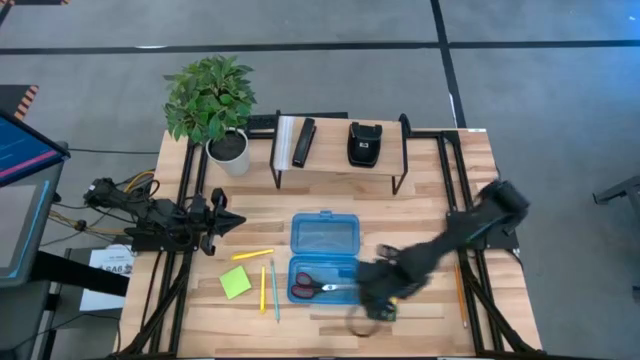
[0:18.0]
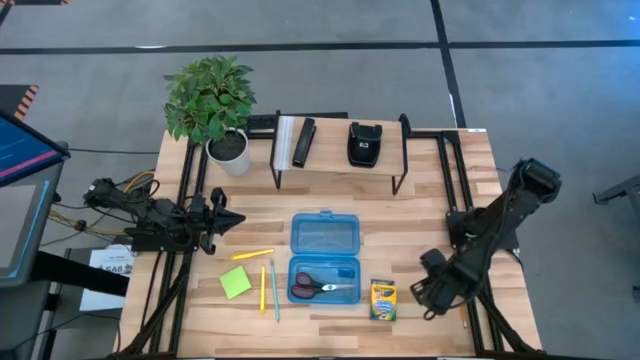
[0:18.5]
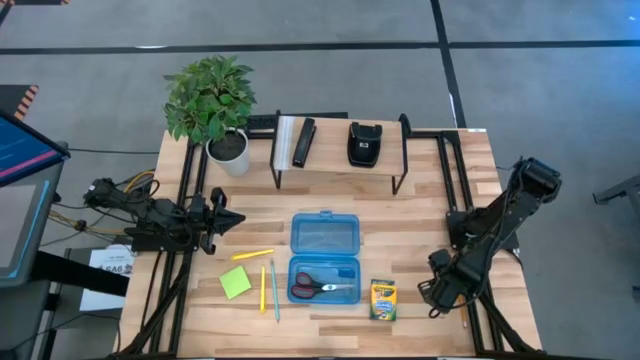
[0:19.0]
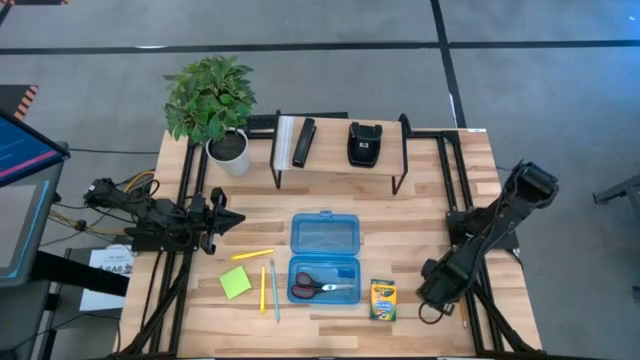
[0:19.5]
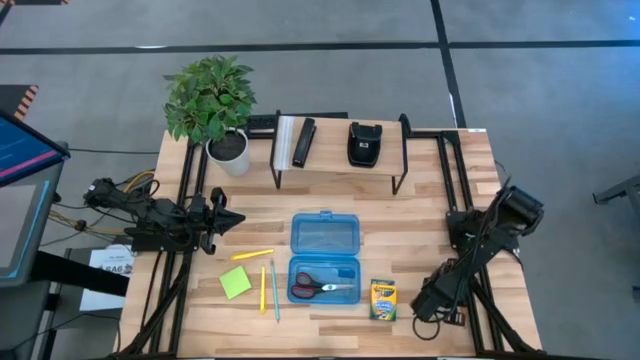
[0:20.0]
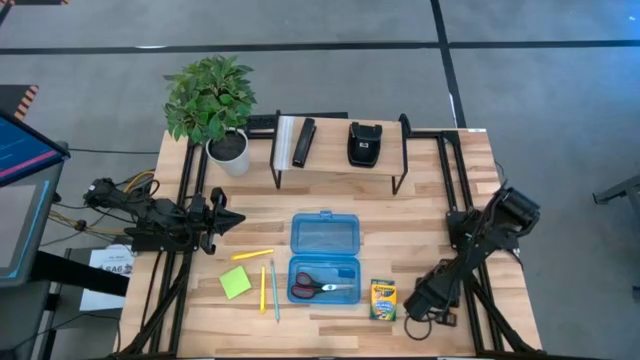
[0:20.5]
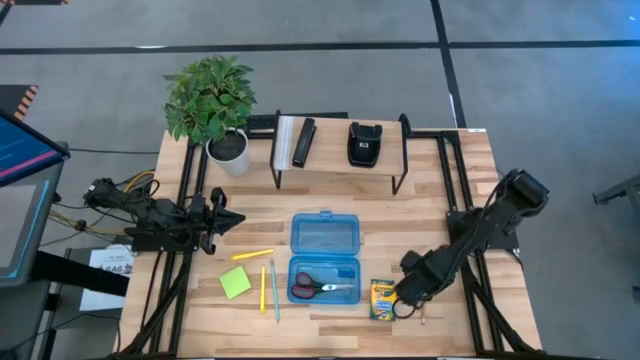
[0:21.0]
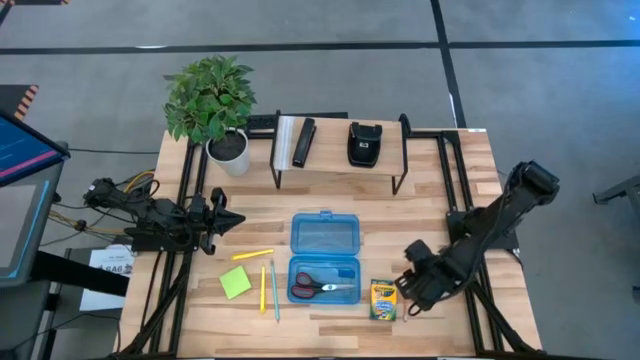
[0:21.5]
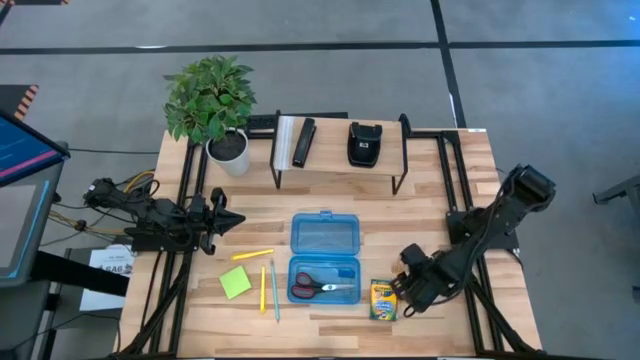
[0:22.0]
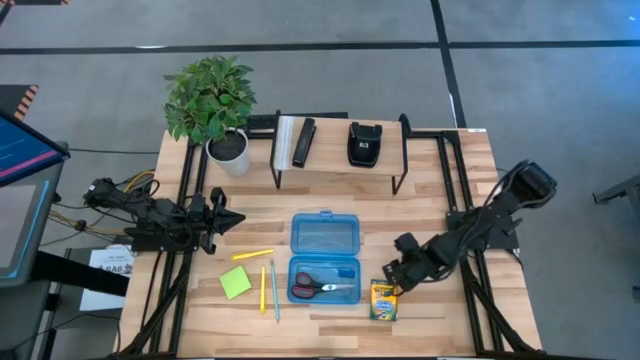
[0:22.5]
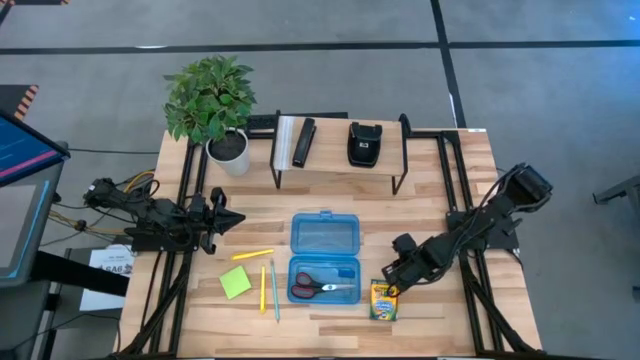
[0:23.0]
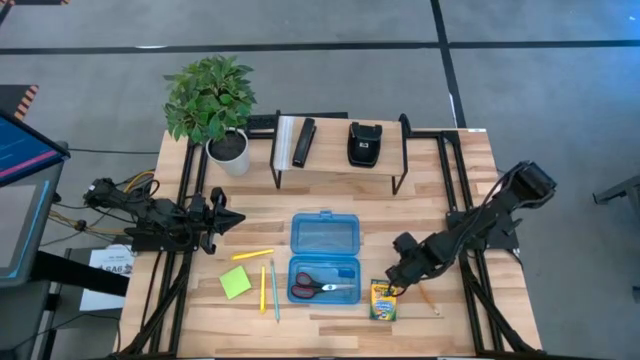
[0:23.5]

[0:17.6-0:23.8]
Task: Pack school essentials
Put the orange pencil into the supply box

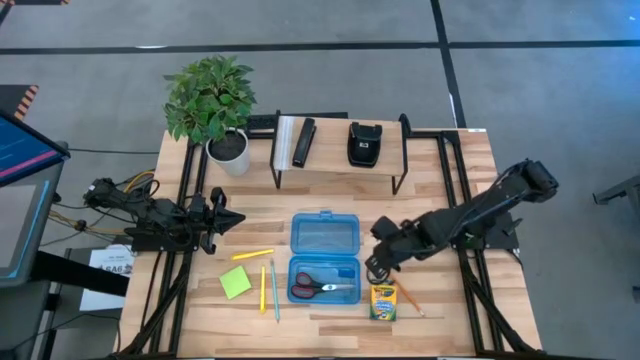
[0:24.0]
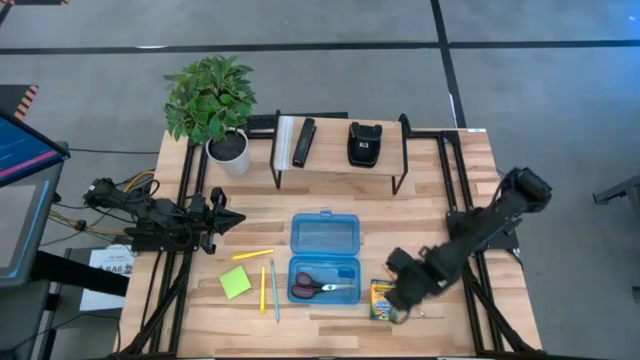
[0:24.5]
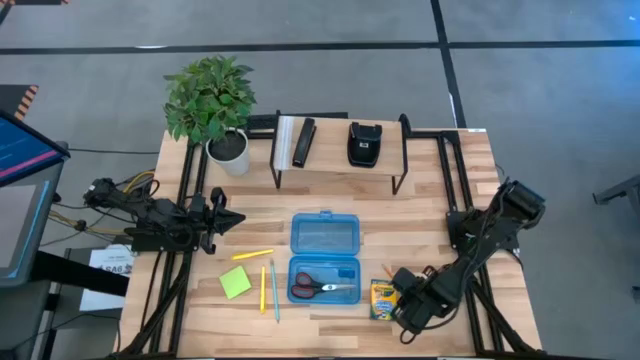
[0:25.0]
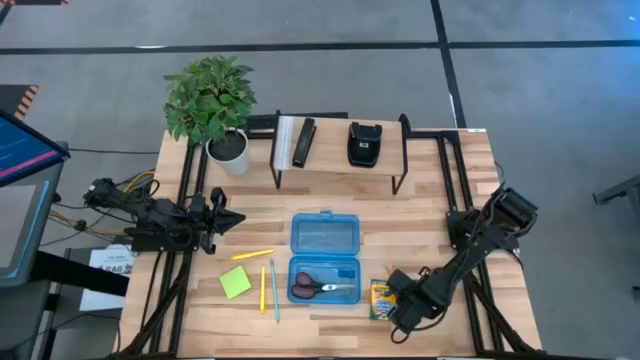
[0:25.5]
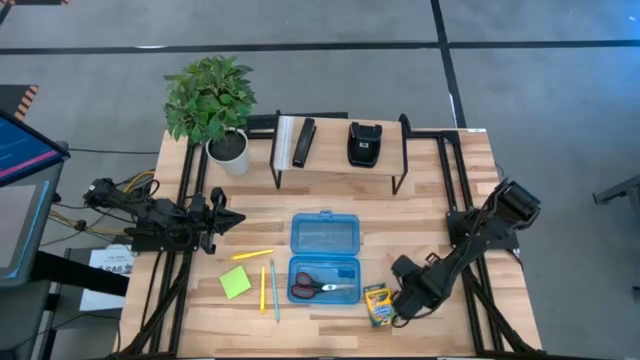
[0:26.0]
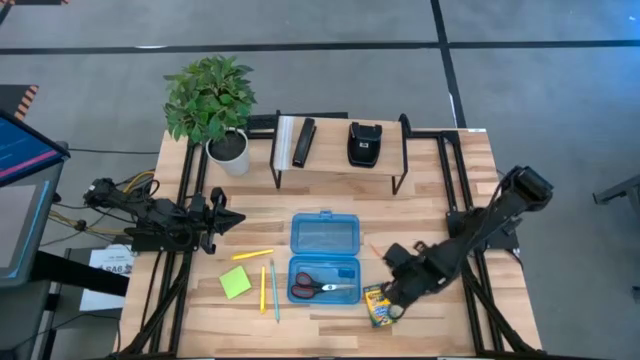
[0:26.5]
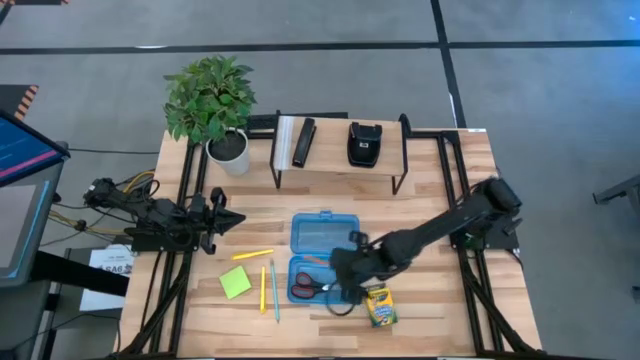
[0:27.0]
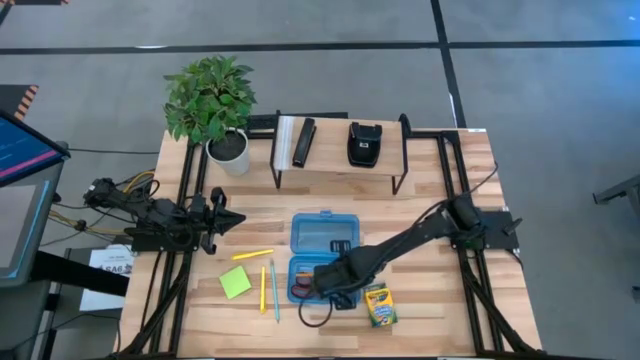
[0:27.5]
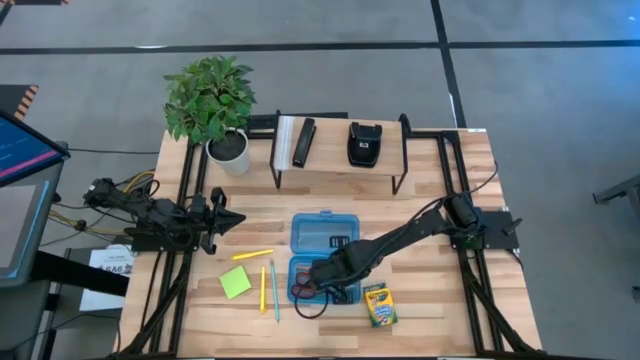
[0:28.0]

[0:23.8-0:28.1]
Put the orange pencil into the supply box

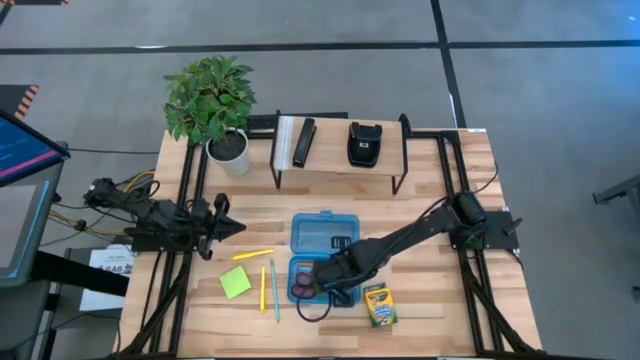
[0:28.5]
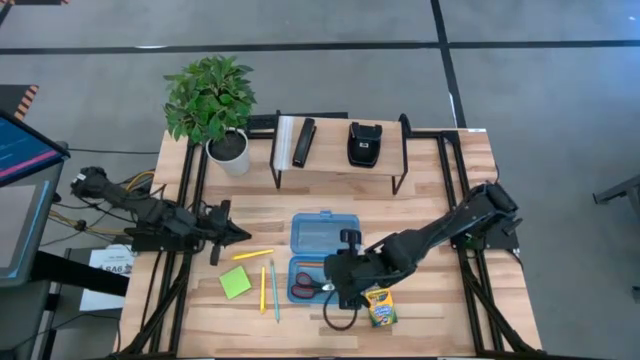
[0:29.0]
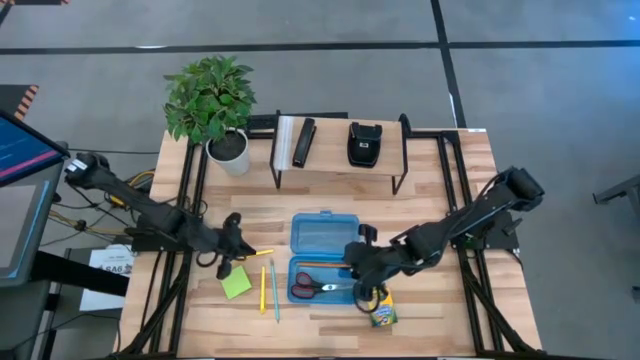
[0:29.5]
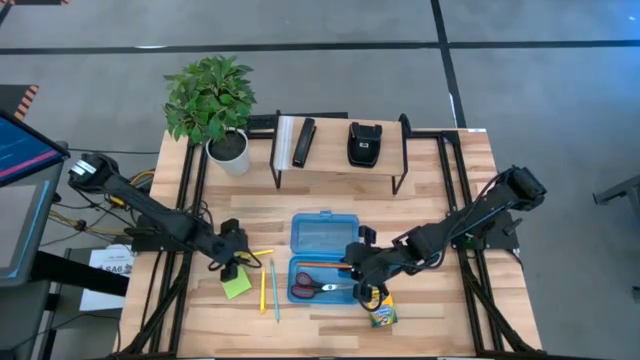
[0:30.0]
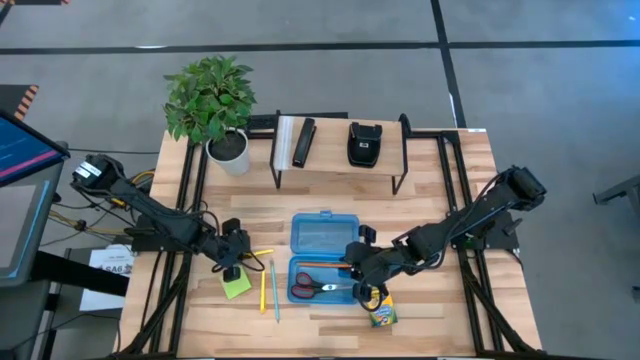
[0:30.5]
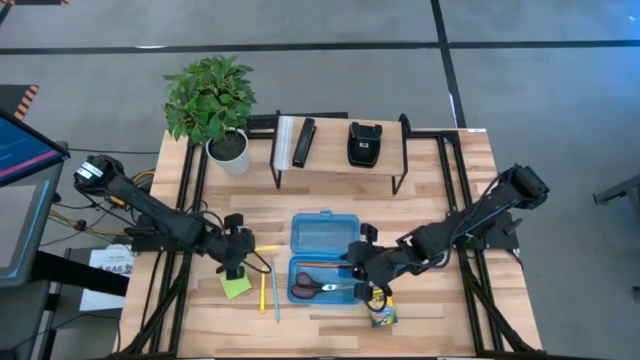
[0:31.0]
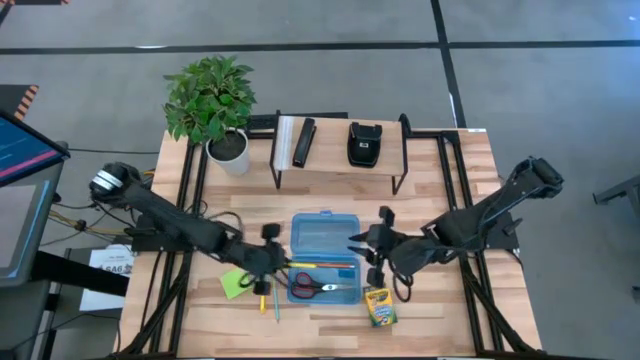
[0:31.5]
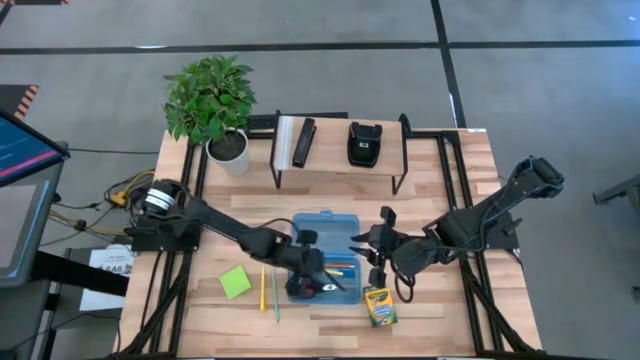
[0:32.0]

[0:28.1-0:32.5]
Put the top pen into the supply box

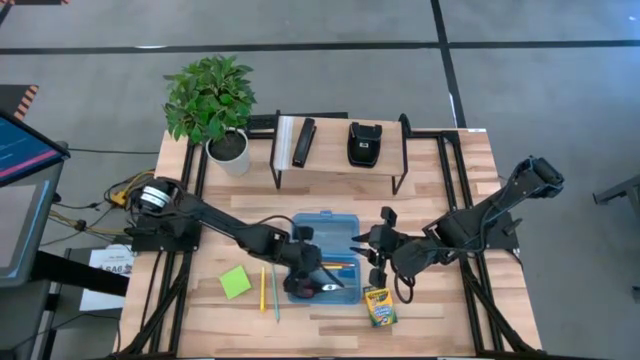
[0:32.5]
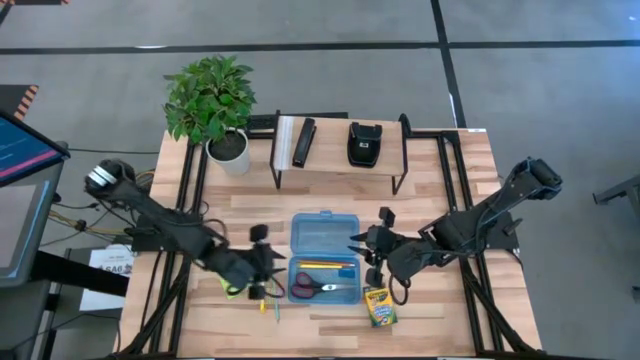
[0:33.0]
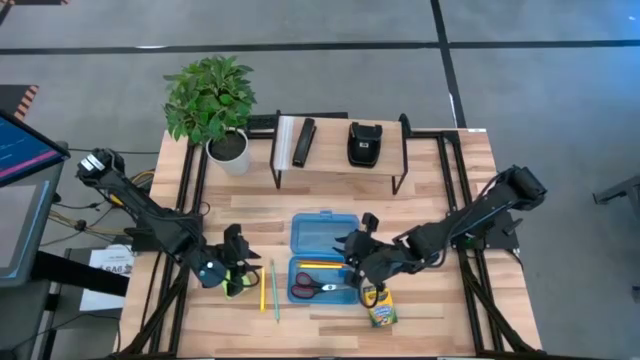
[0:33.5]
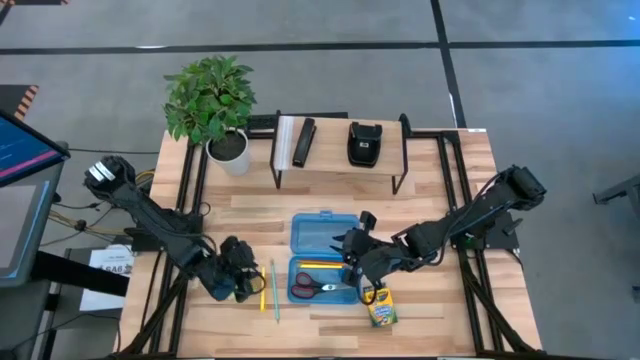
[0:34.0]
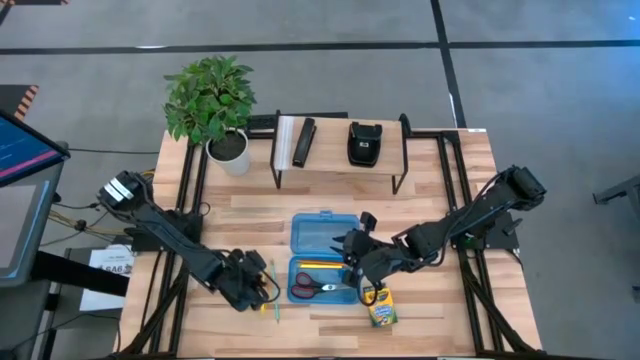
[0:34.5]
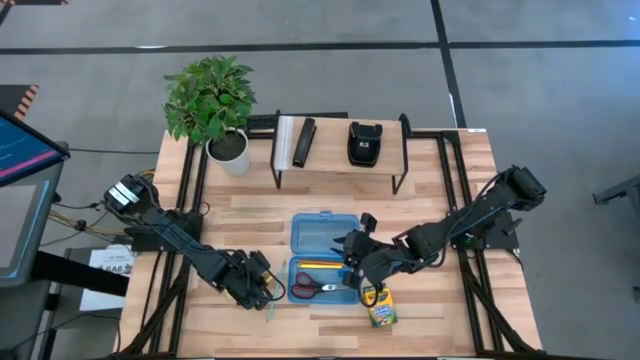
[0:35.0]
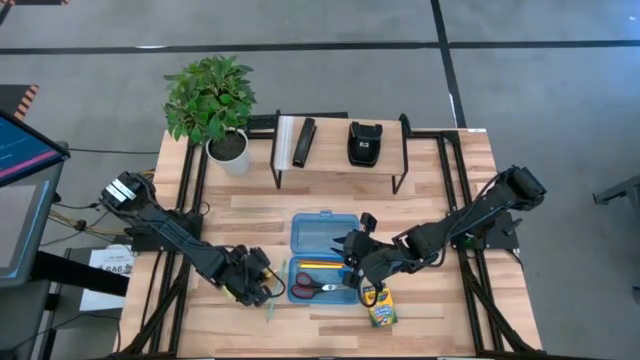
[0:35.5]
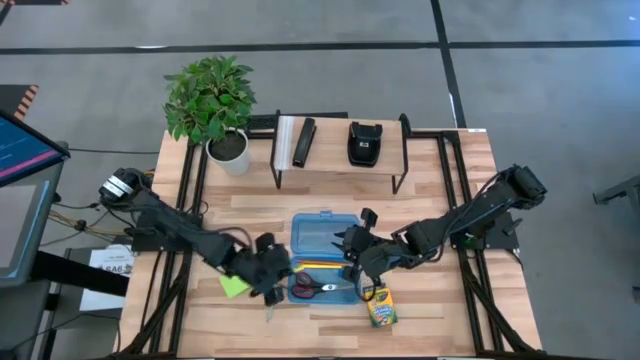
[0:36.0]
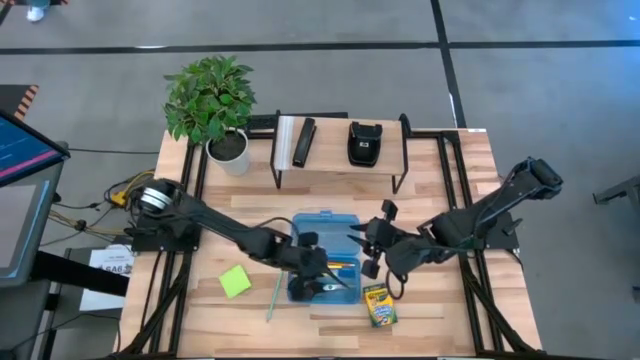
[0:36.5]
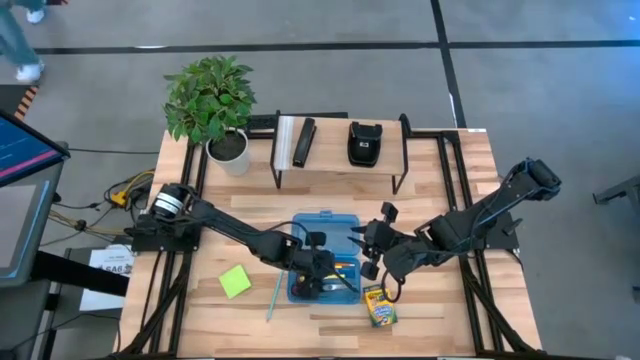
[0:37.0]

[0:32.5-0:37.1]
Put the pen into the supply box

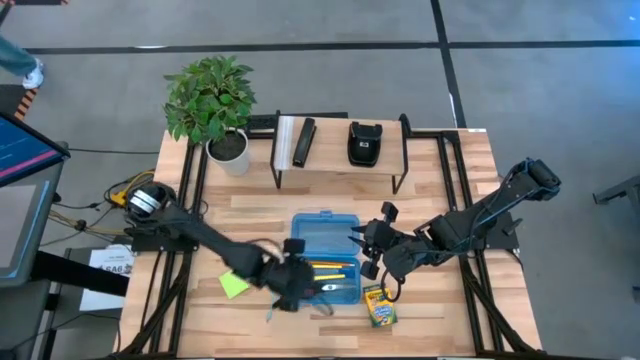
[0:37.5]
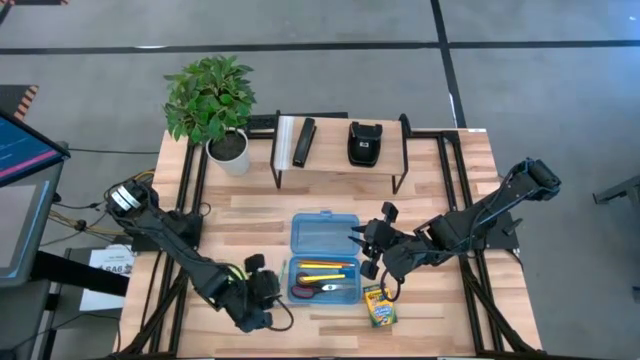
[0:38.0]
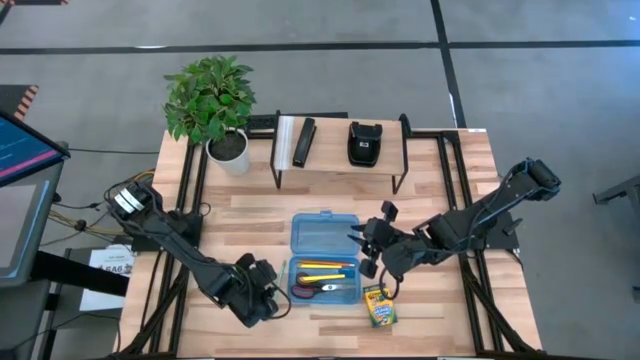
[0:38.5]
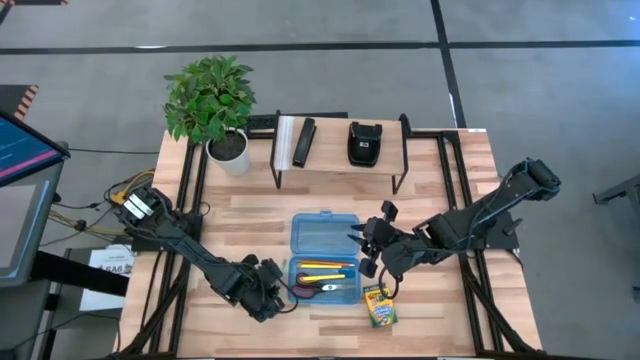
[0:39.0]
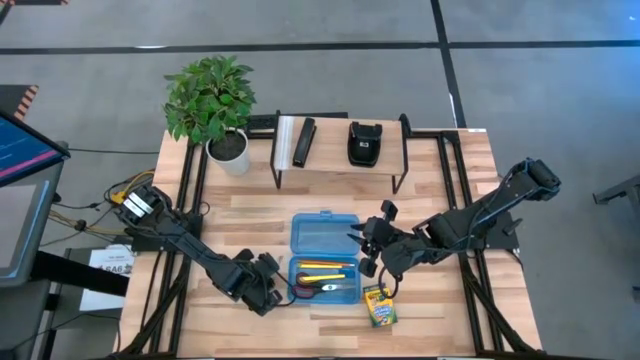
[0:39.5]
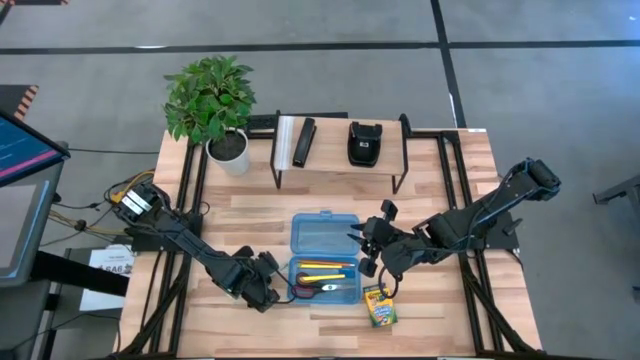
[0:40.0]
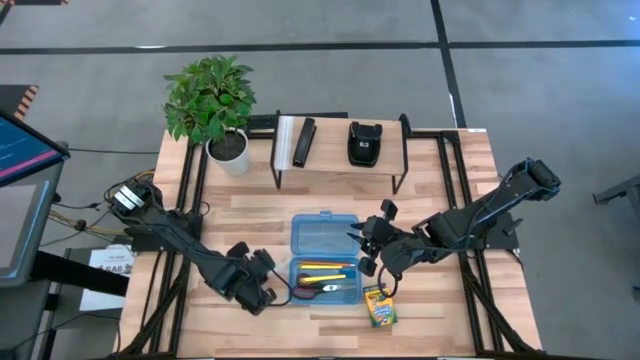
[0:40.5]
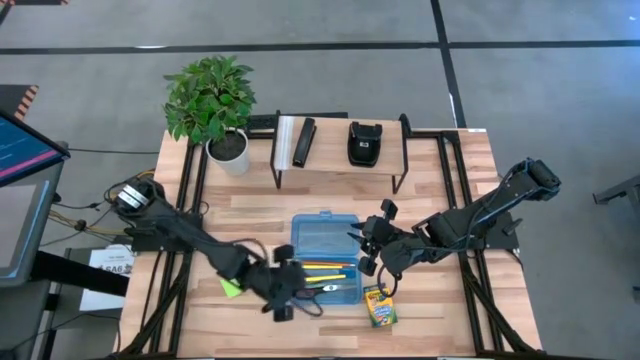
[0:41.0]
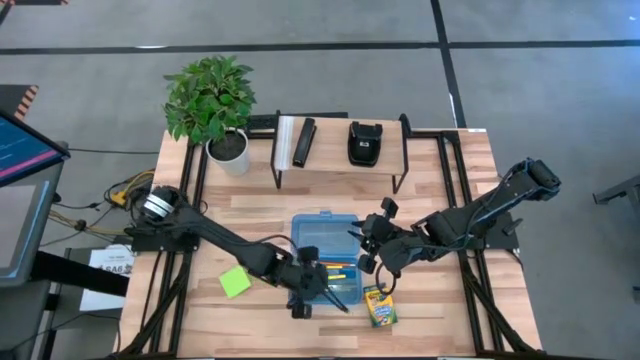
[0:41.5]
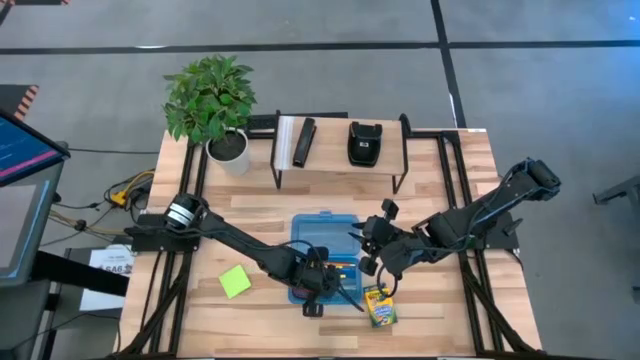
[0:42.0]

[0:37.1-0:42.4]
Put the light blue pencil into the supply box
